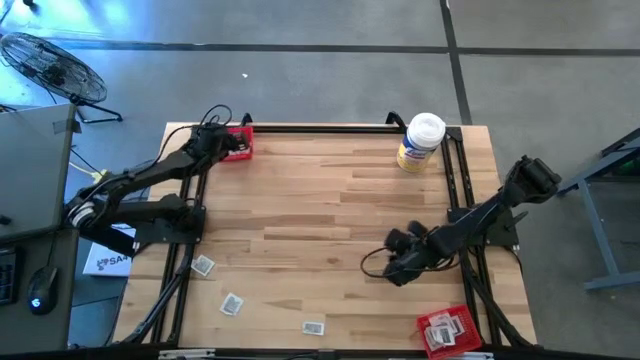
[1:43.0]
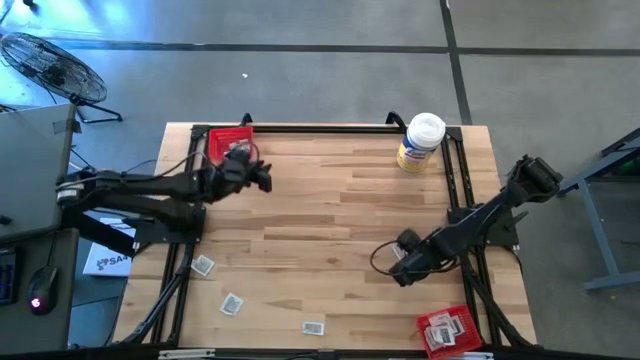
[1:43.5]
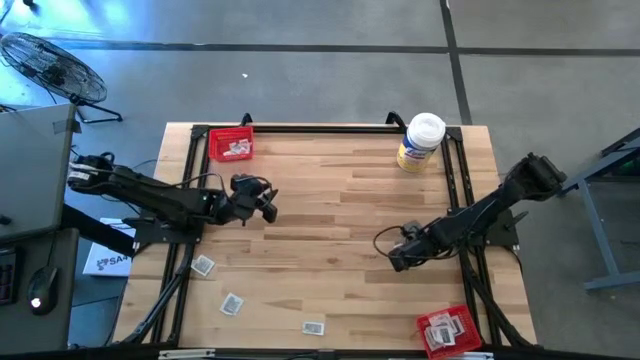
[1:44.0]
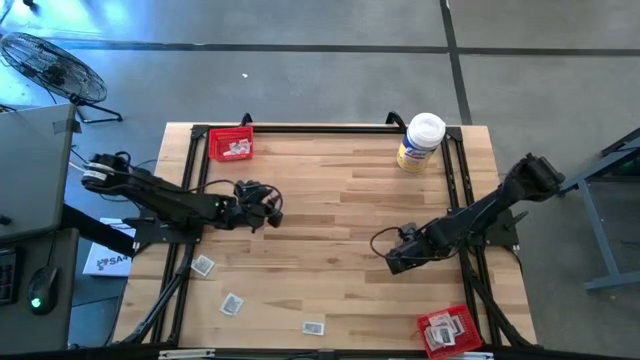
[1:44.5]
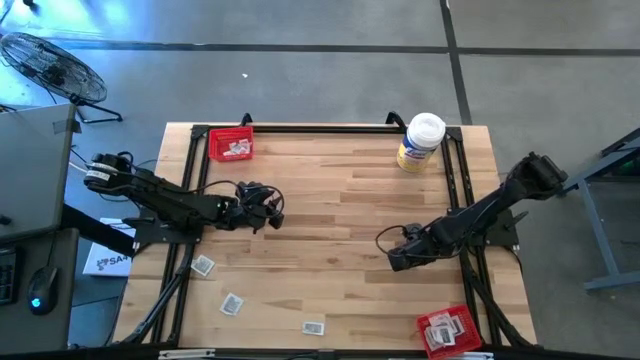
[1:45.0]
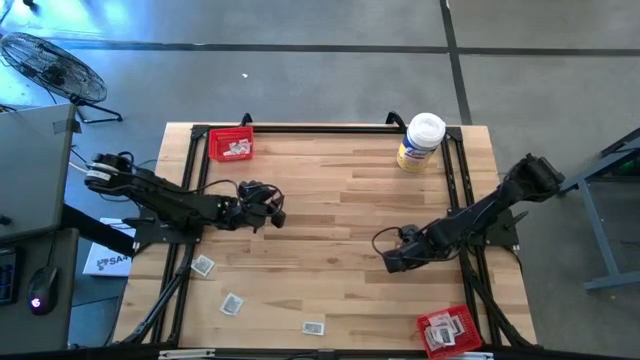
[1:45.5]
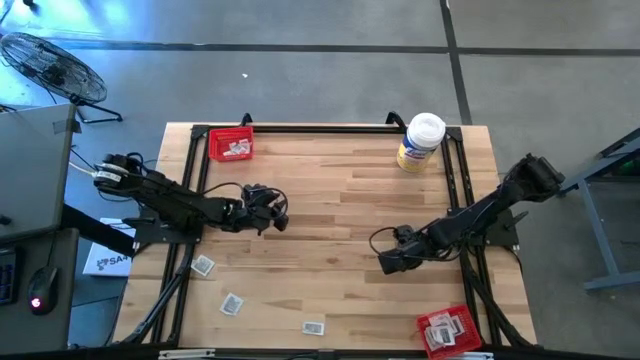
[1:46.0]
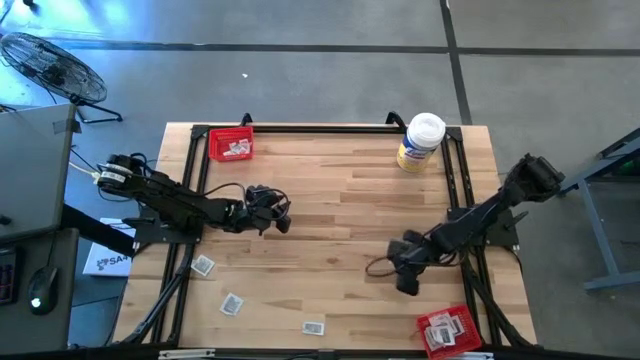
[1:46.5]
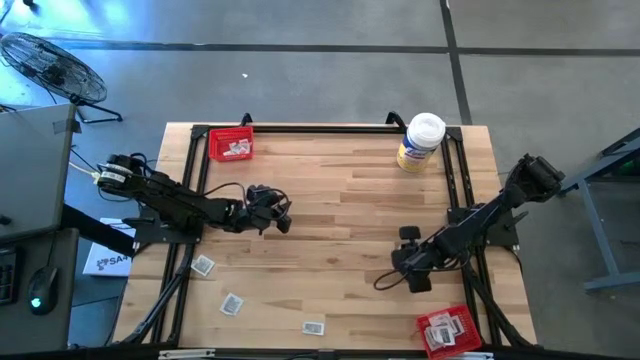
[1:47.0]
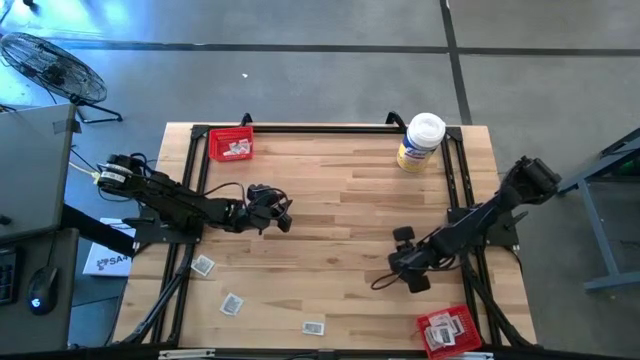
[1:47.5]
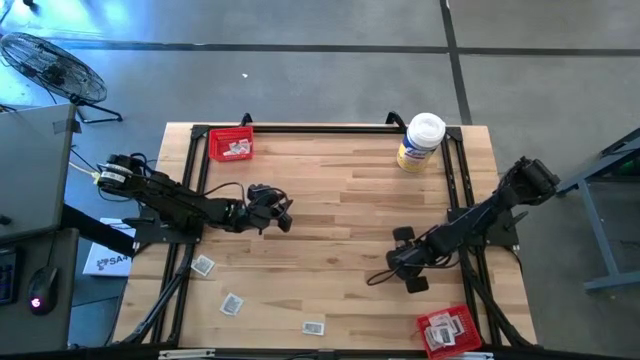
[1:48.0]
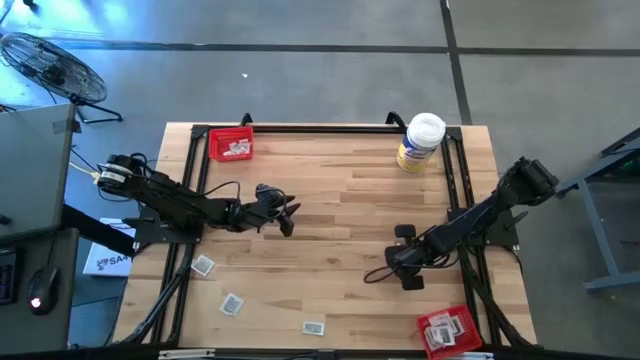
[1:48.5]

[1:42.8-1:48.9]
Task: Pick & Place First Aid Supplies
Put the white and orange ointment pack into the top red bin

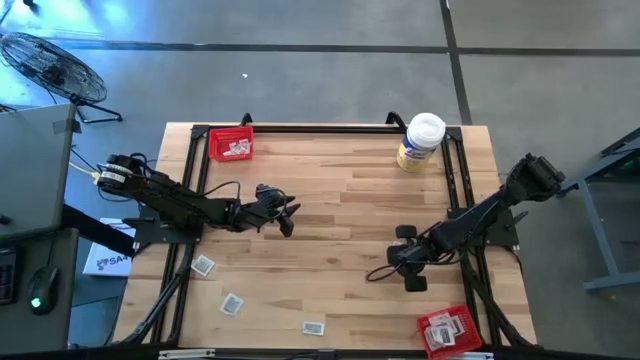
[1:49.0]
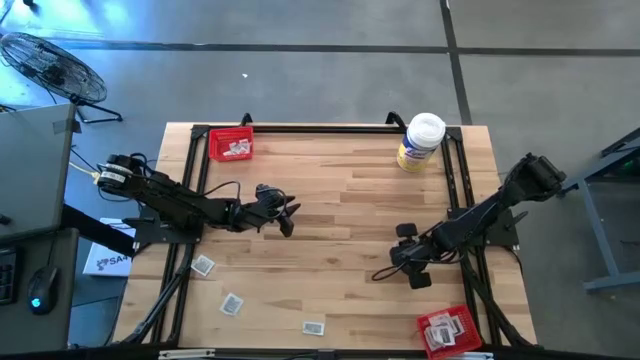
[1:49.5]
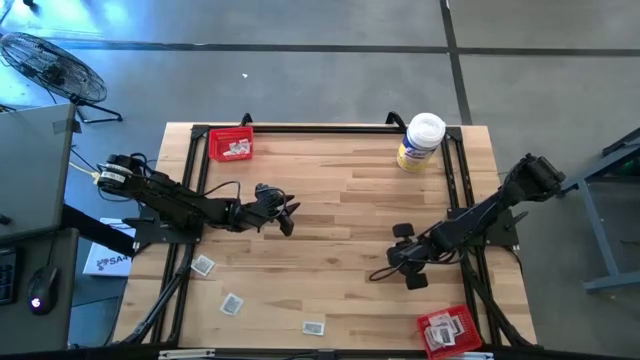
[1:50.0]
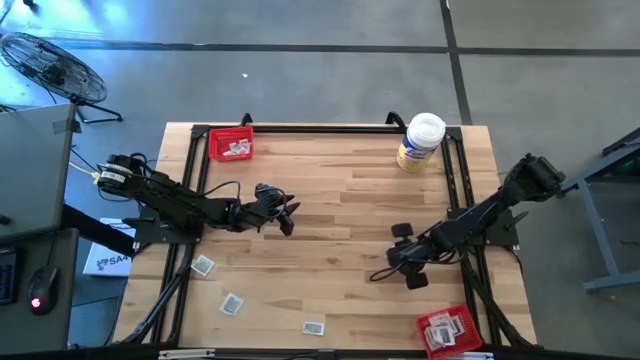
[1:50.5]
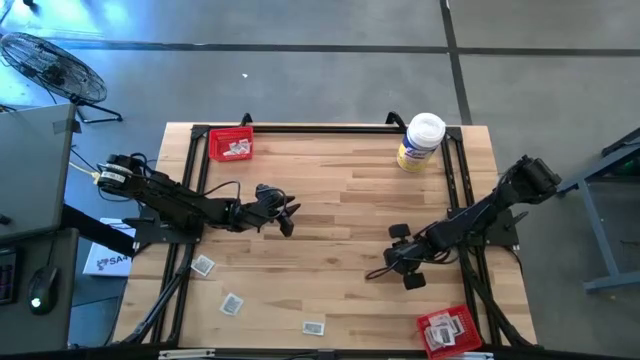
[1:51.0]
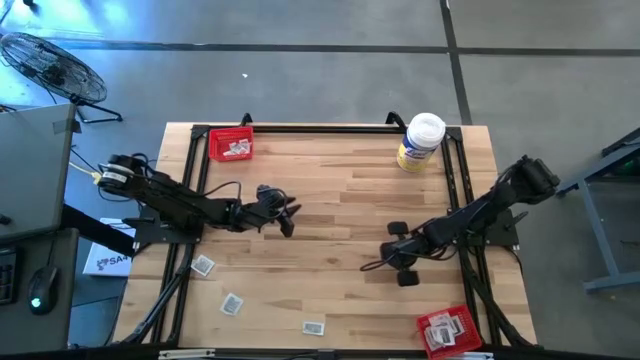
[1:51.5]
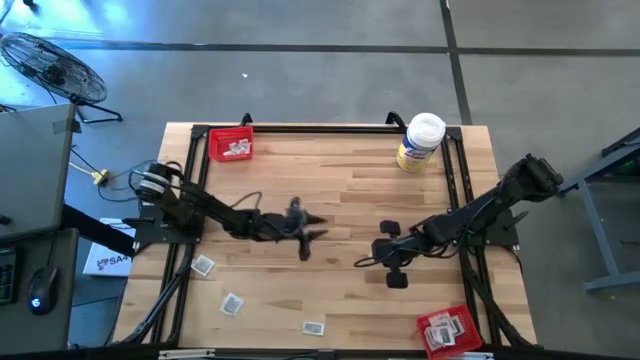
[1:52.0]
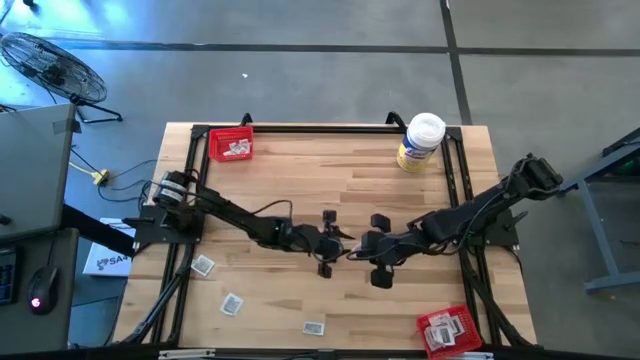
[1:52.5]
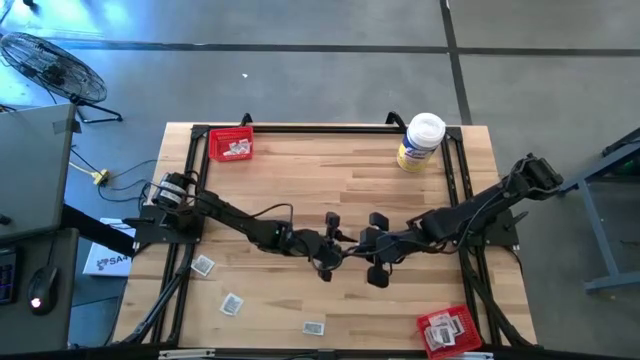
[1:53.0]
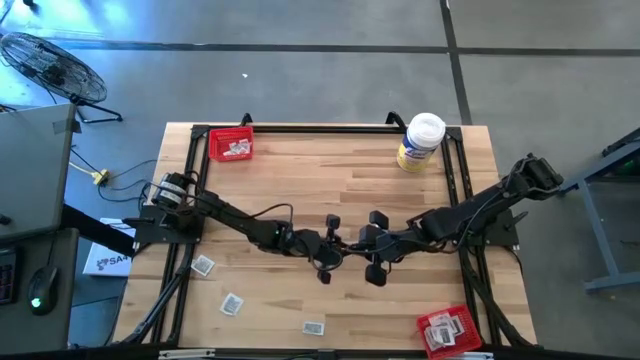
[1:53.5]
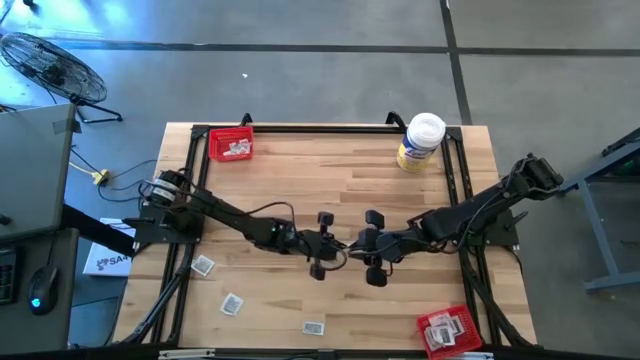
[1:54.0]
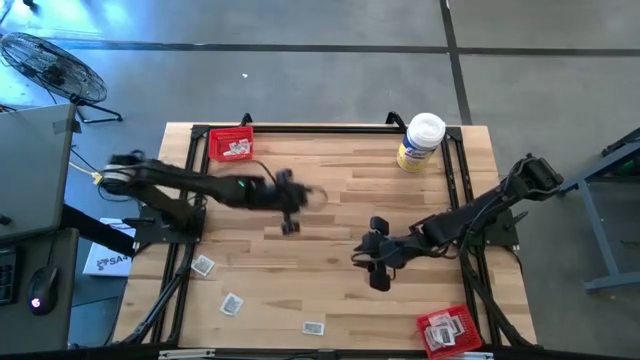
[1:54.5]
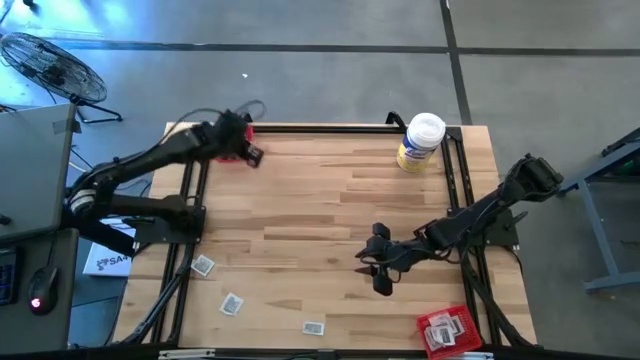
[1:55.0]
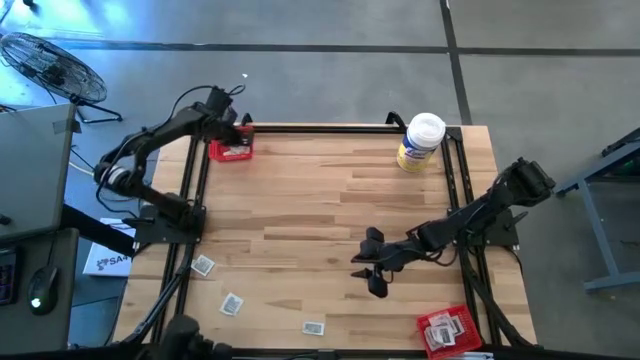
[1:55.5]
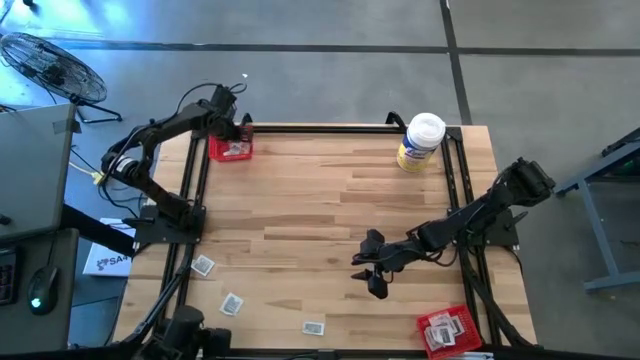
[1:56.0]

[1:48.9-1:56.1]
Put the white and orange ointment pack into the top red bin

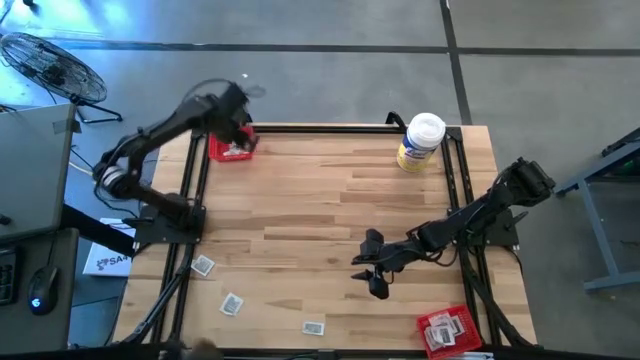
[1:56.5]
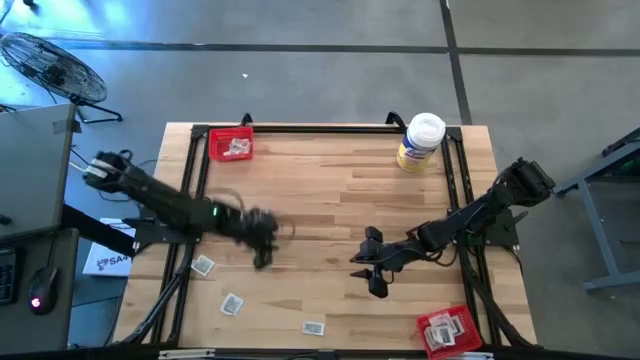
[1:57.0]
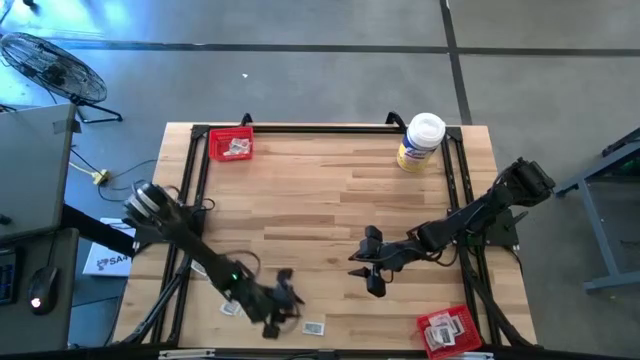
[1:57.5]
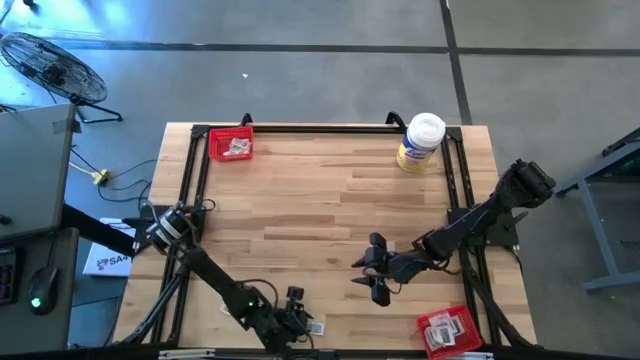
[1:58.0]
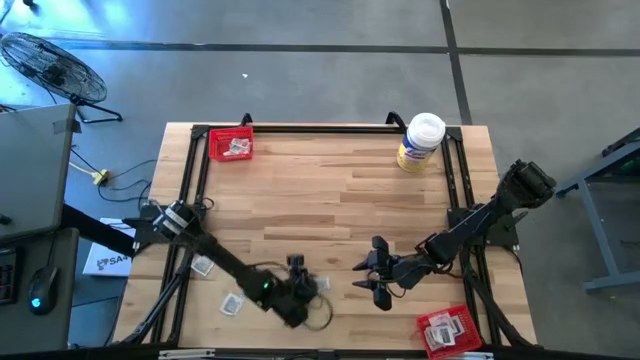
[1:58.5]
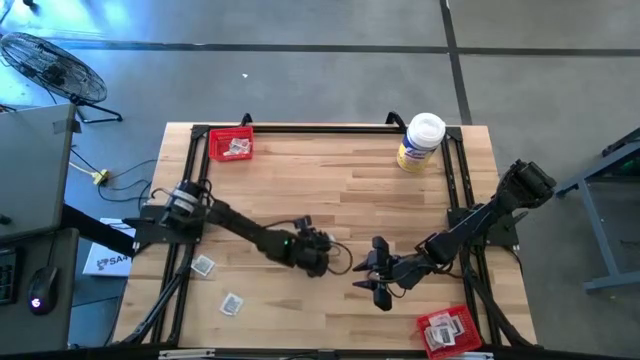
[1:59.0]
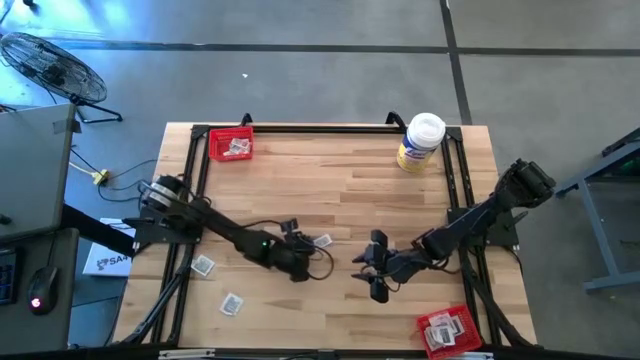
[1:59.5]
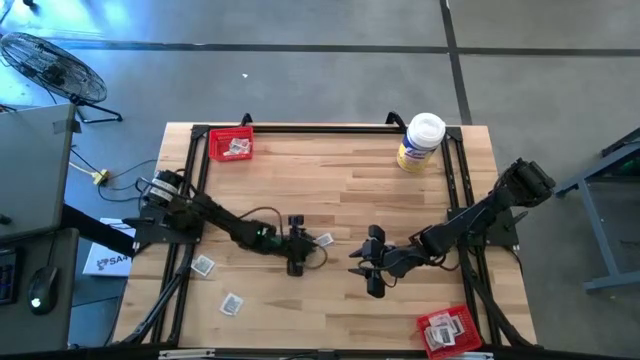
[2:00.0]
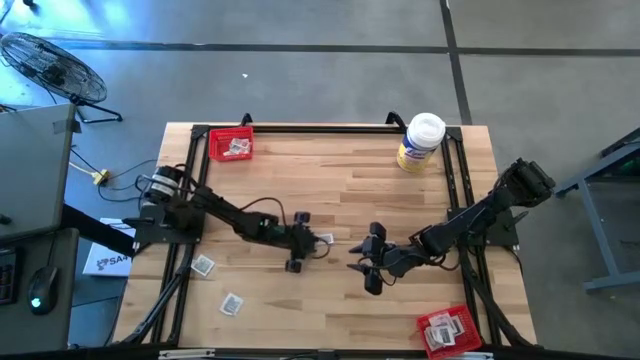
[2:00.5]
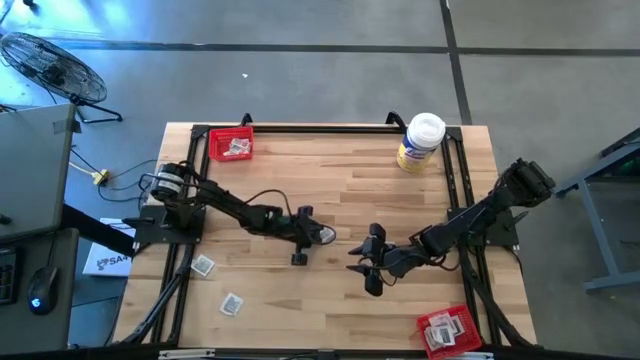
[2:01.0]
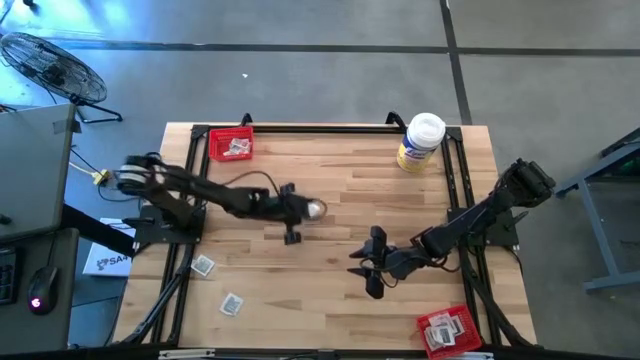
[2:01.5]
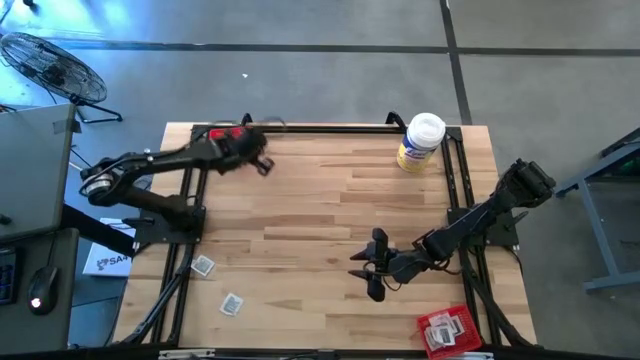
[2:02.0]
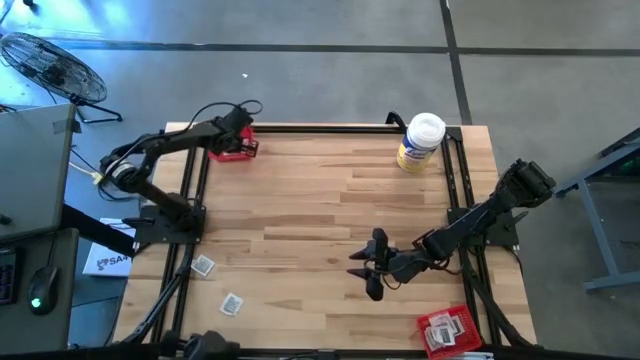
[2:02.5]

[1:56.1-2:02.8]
Put the white and orange ointment pack into the top red bin

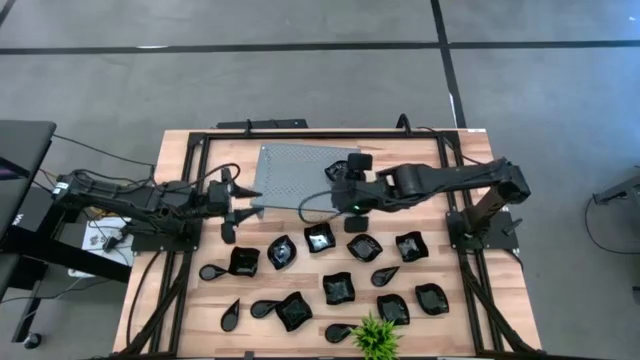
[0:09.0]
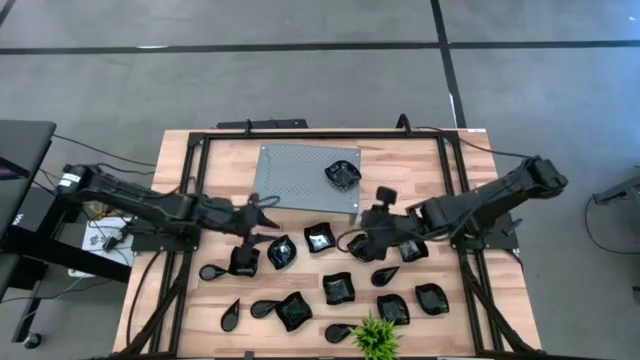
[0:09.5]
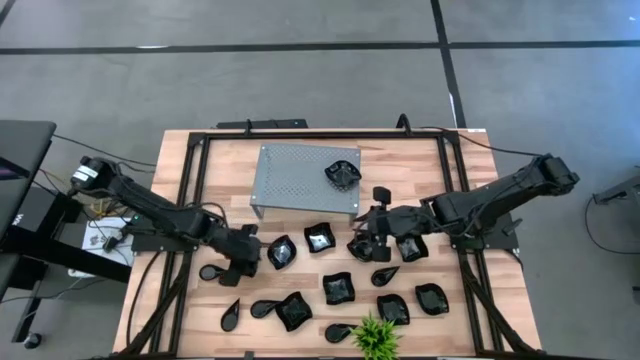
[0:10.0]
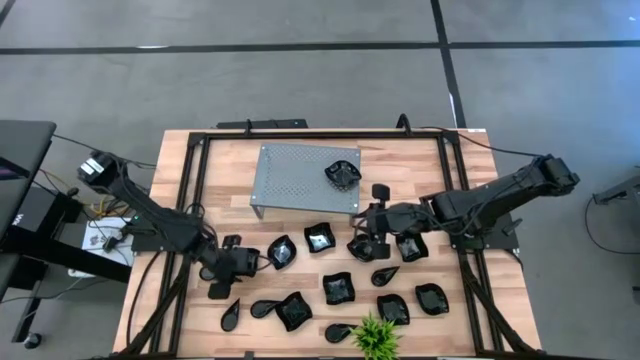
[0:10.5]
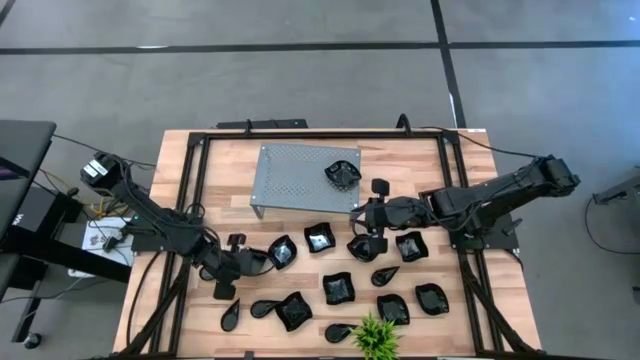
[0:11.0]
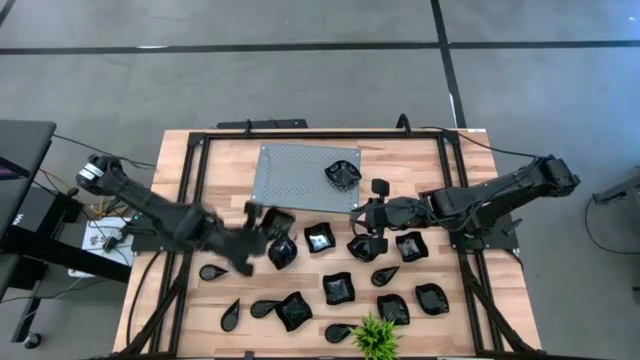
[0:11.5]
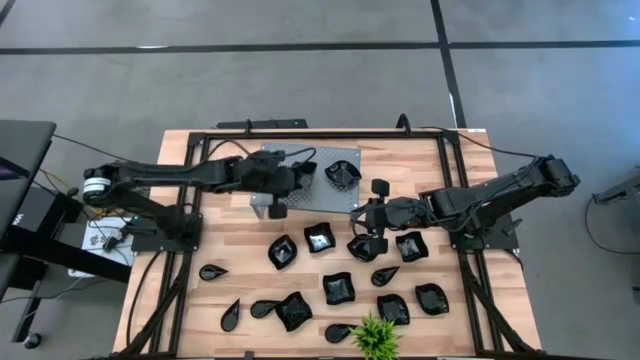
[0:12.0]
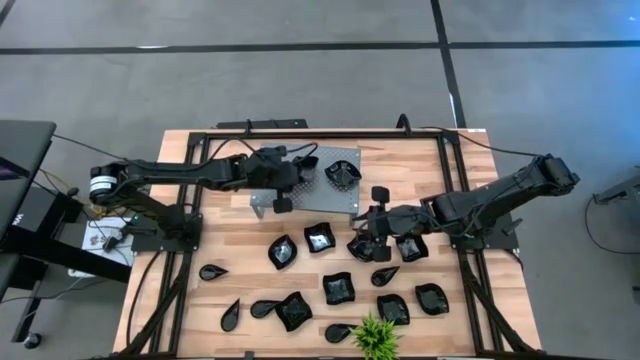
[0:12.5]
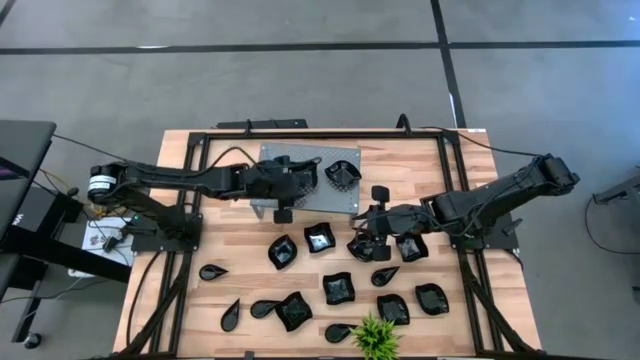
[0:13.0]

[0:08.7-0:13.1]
Task: Pick & Place Mini shaped plates
Put the black distorted square plate on the shelf
